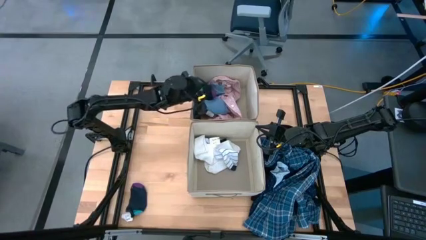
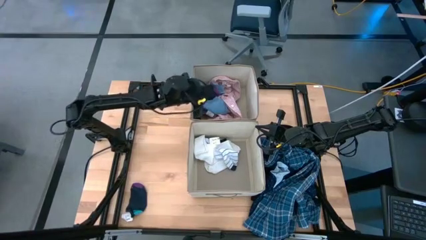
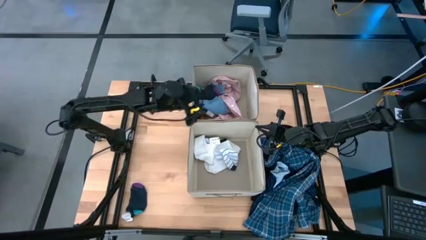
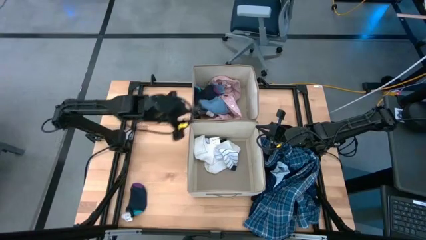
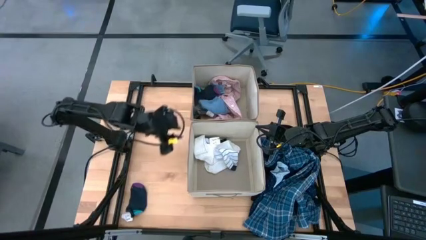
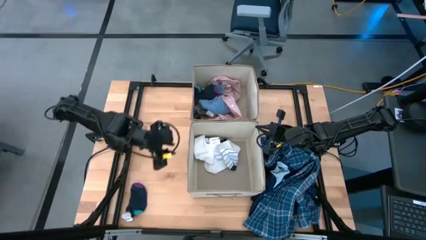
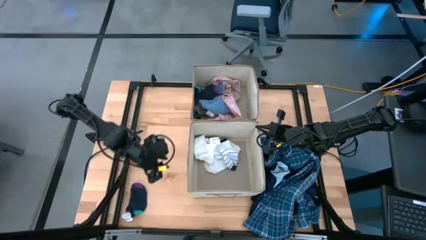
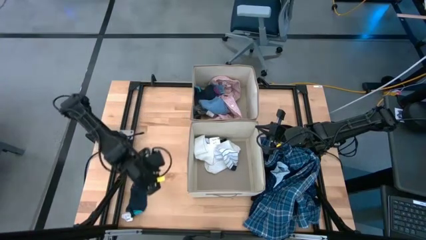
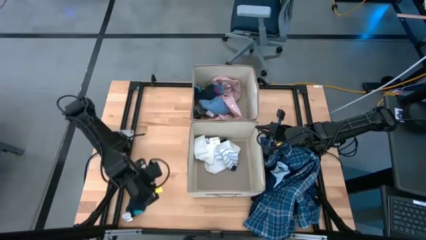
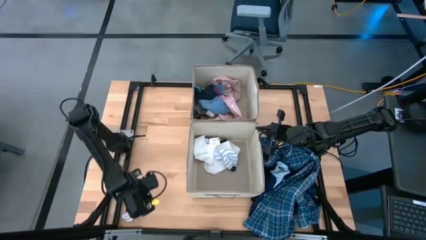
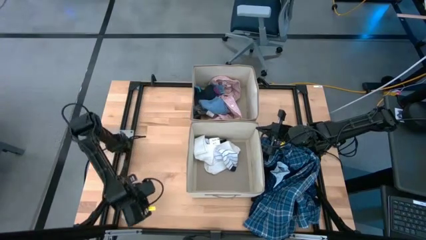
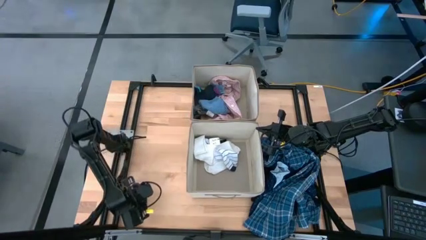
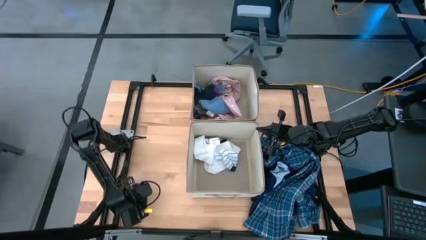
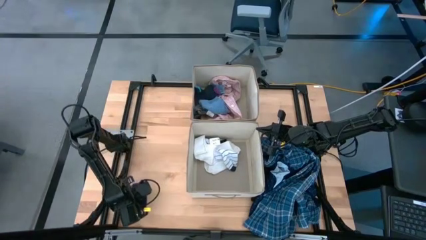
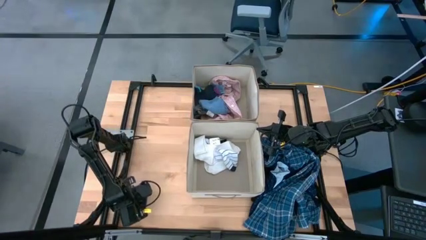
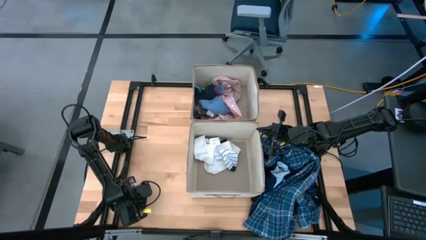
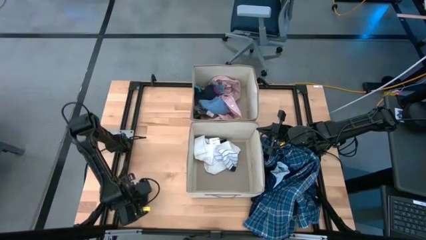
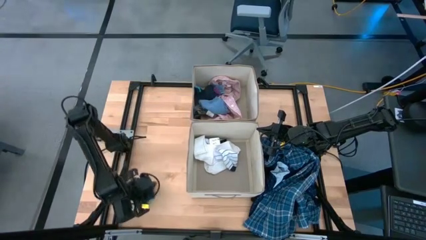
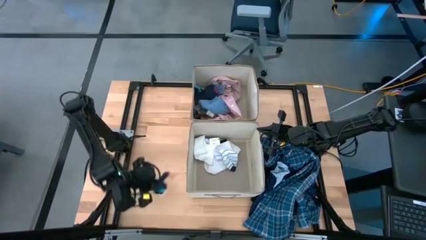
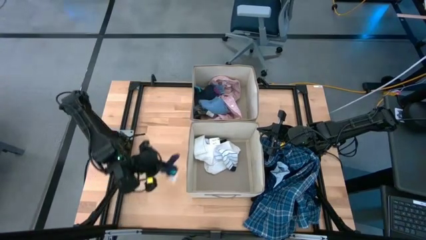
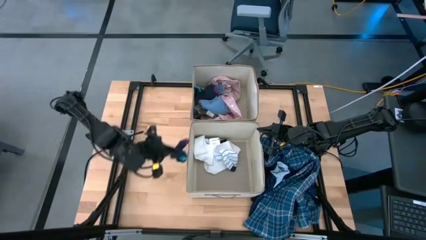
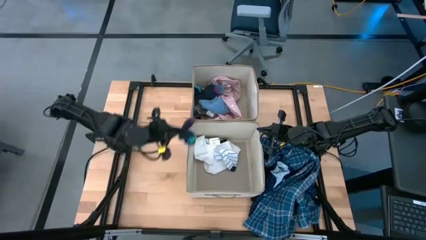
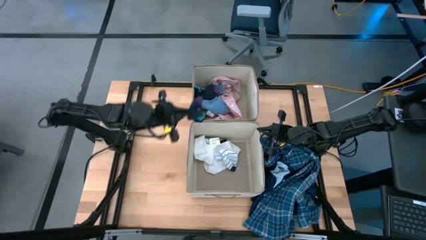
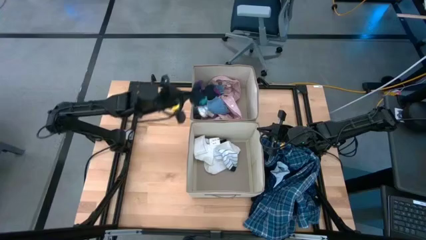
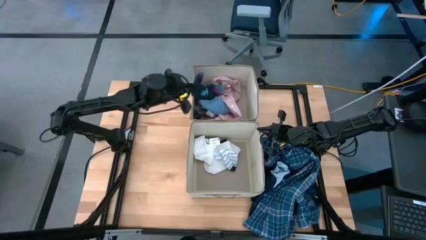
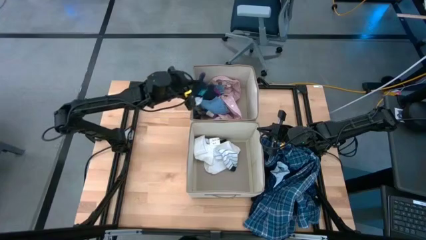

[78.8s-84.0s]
Task: Sort clothes
Put the dark blue sock into the top laundry organizer

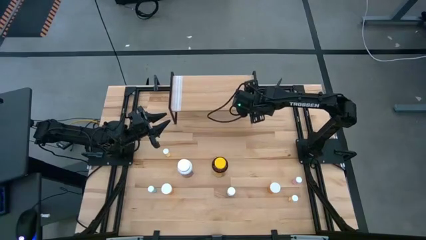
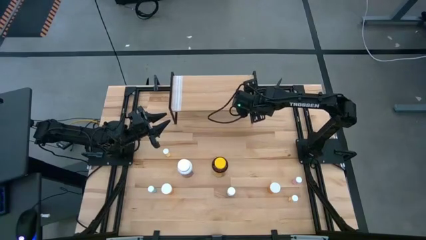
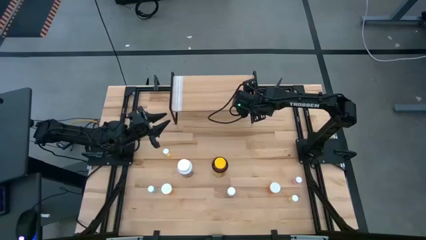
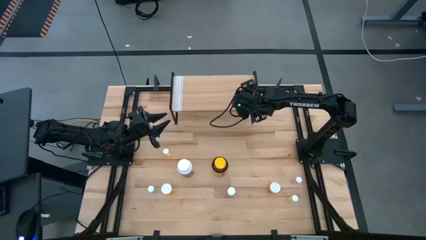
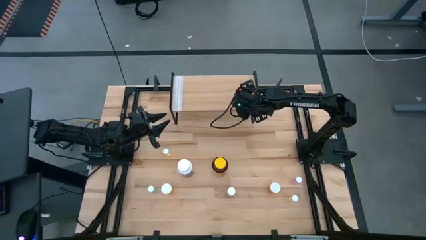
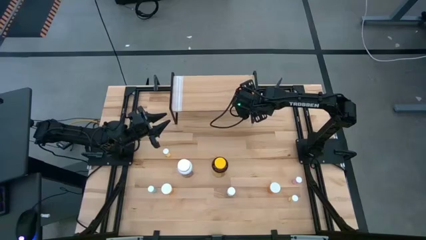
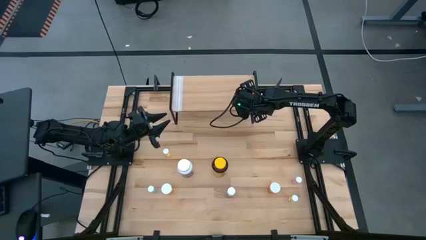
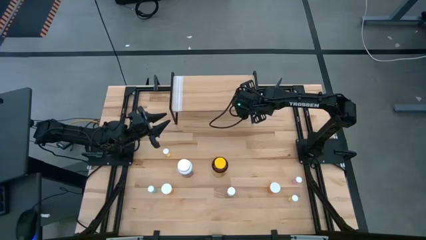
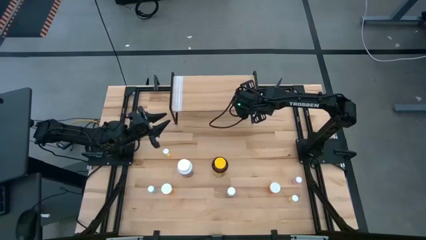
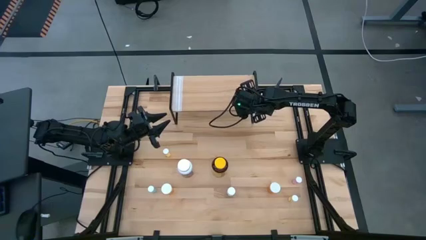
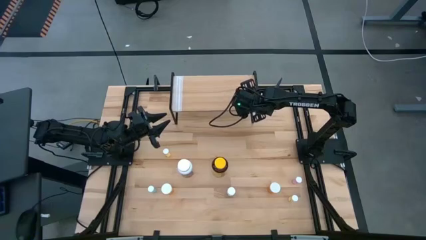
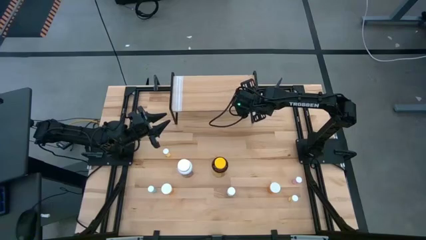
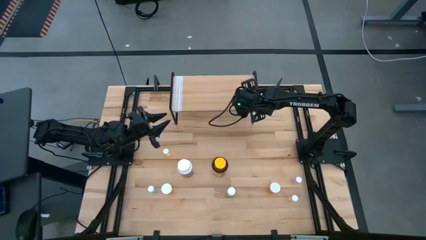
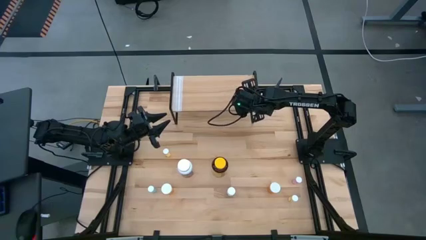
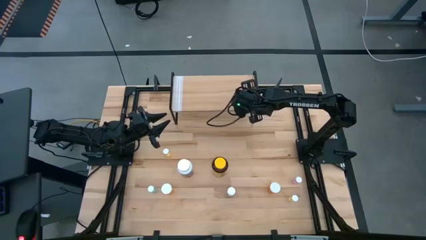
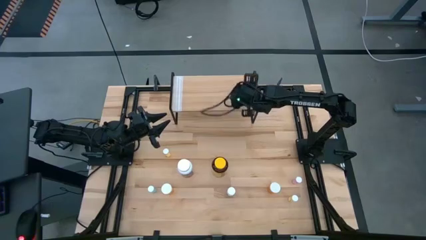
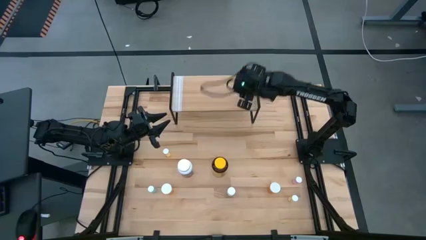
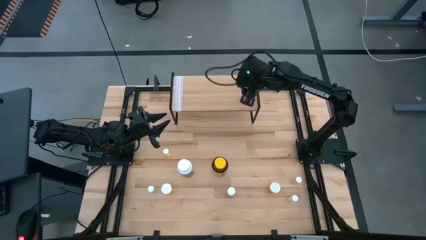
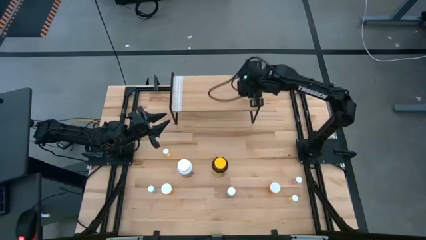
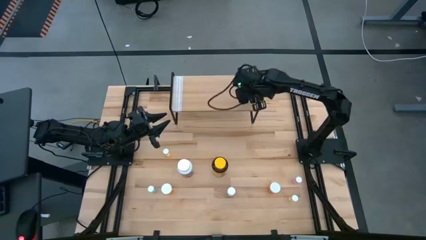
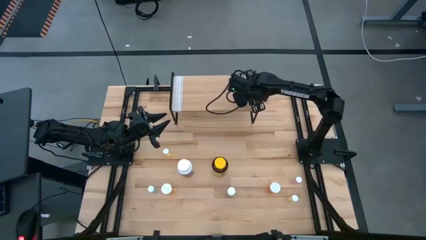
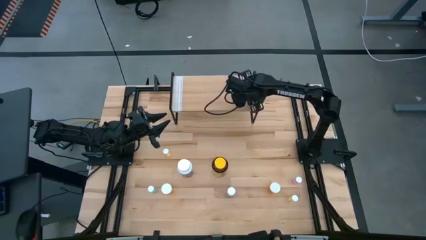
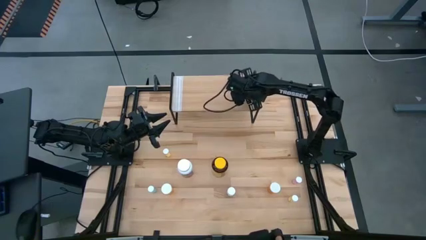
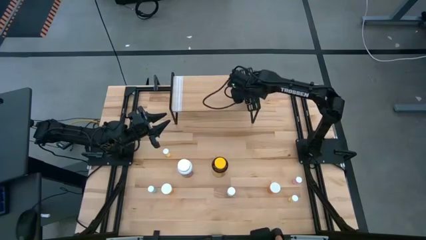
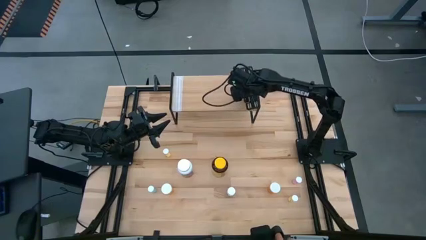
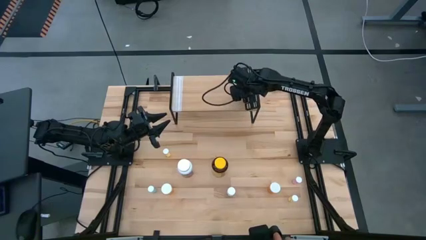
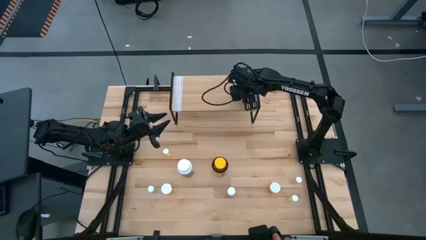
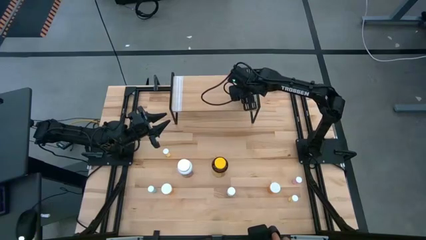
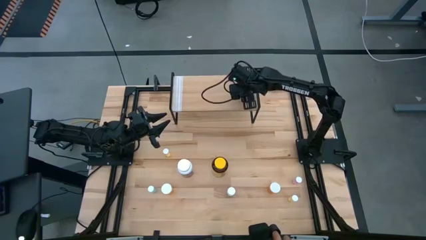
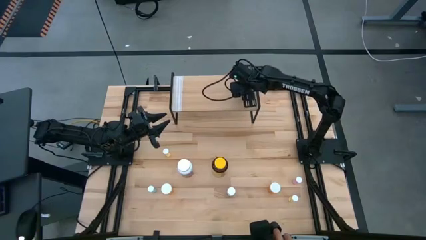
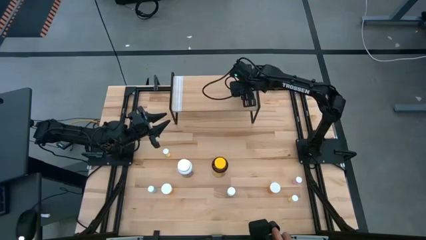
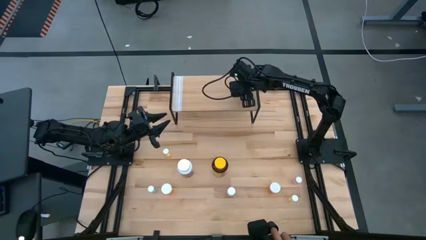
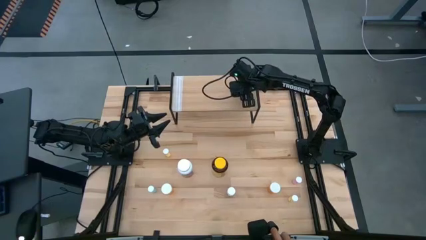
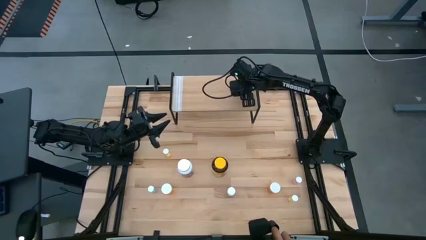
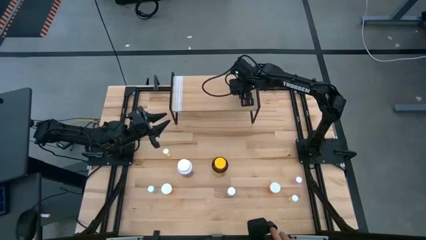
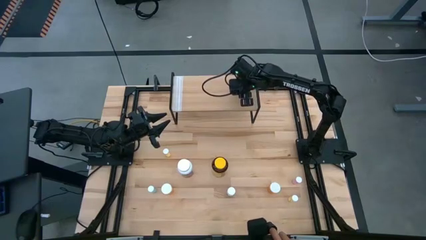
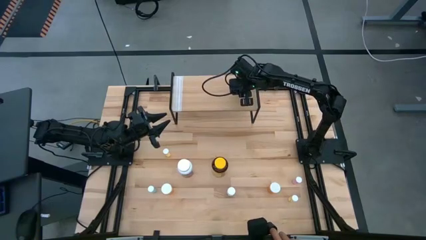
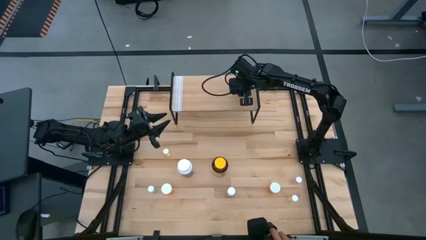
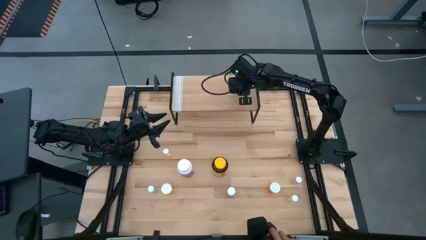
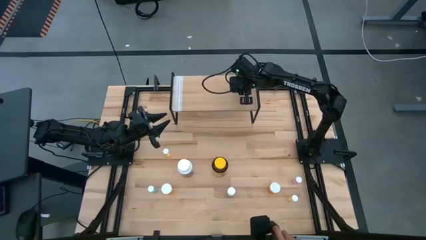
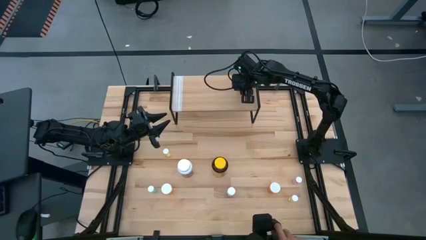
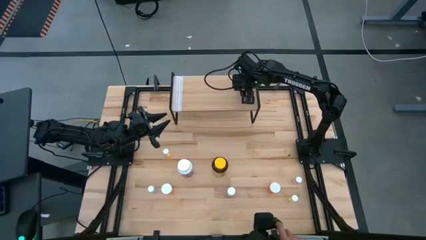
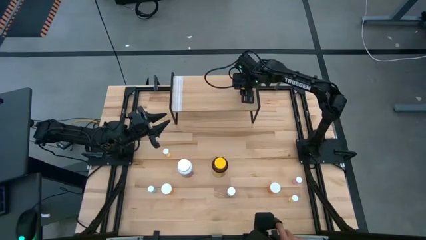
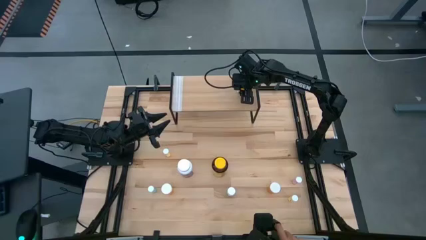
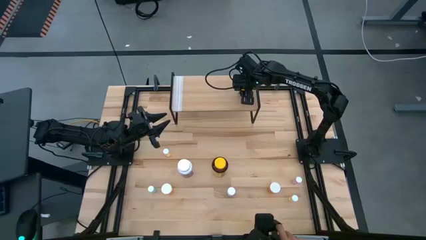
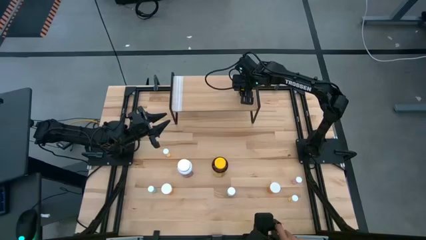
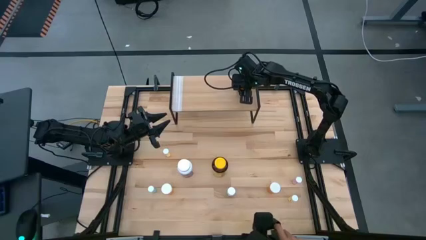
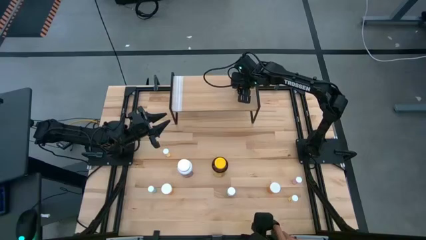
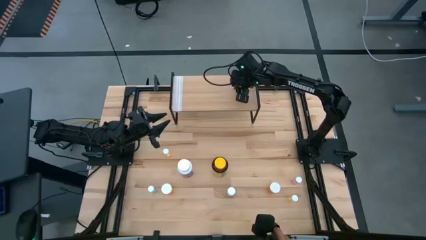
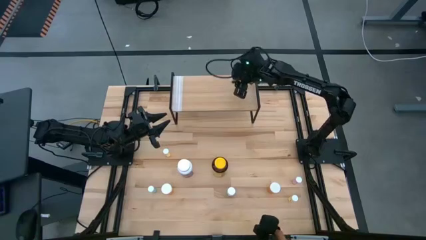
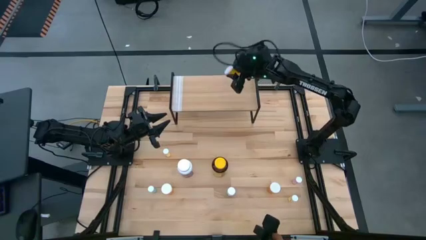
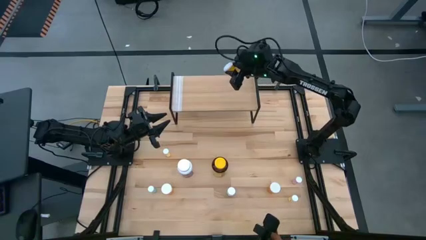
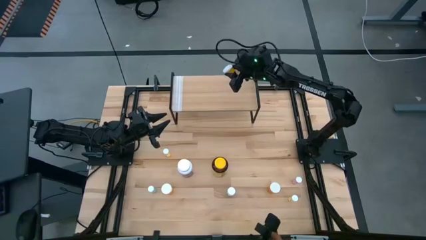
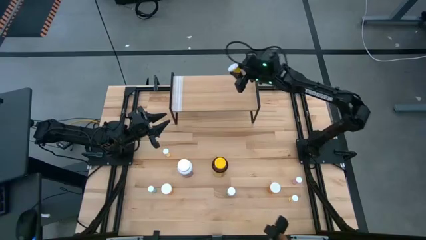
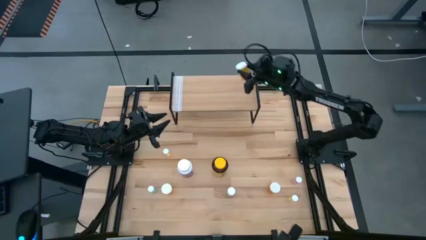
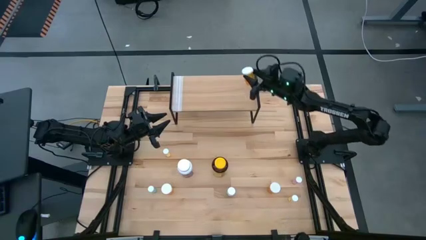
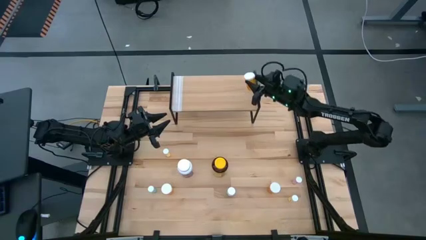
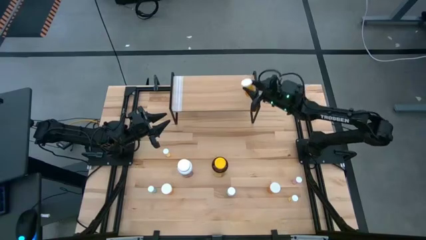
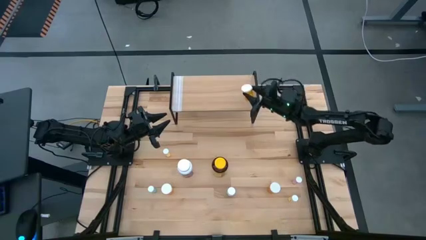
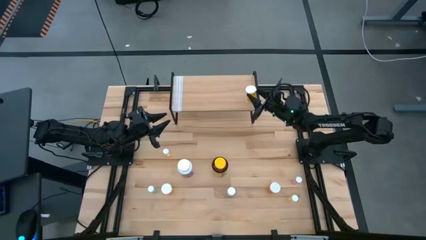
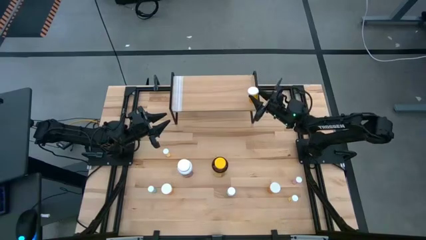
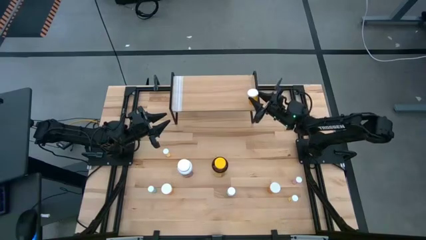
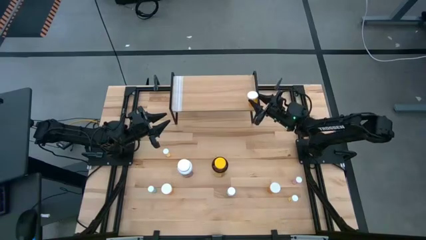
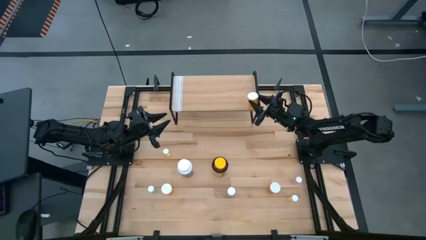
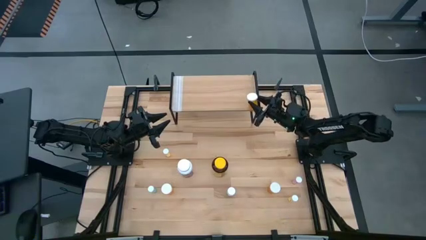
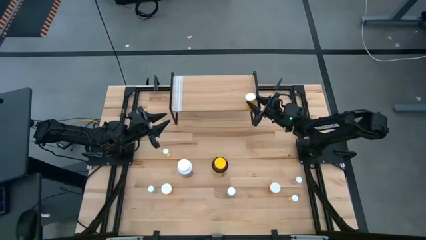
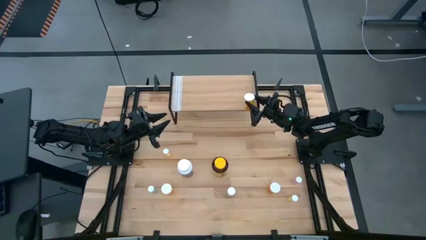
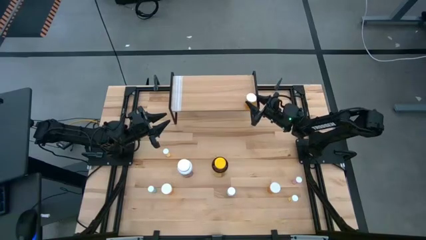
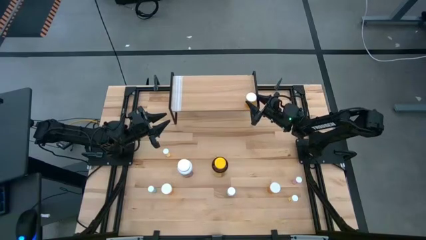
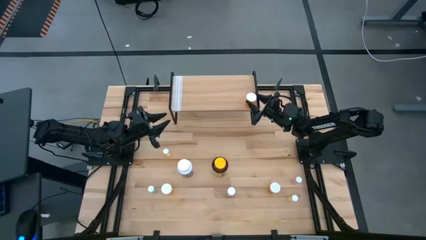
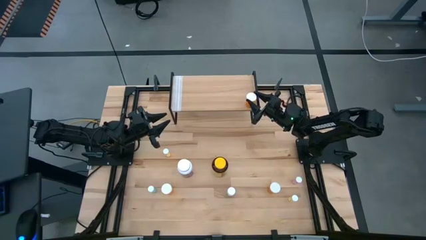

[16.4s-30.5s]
Task: Pick and place medicine bottles onto shelf by color
Put the top small orange medicine bottle on the shelf
